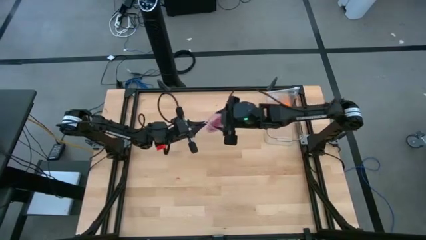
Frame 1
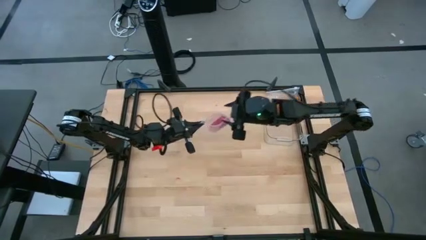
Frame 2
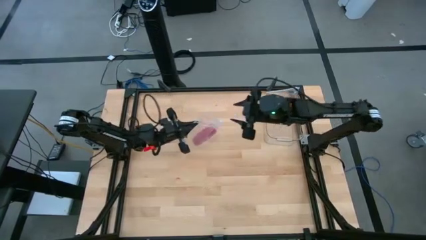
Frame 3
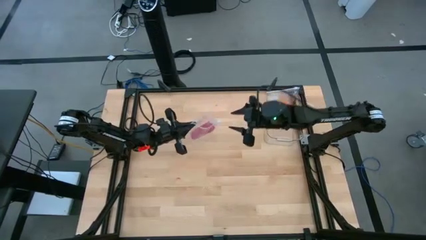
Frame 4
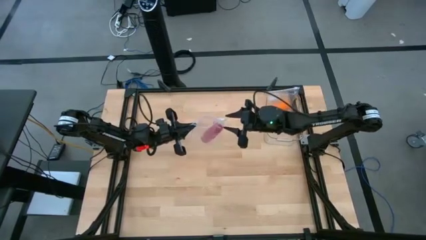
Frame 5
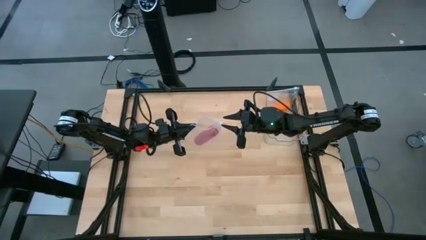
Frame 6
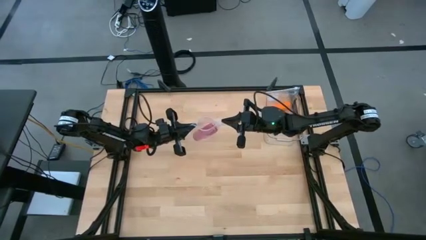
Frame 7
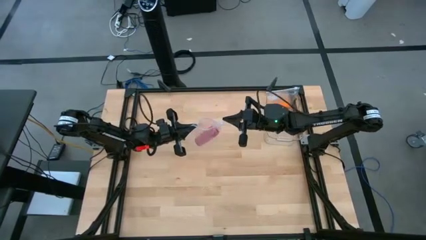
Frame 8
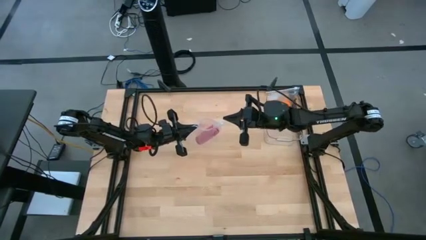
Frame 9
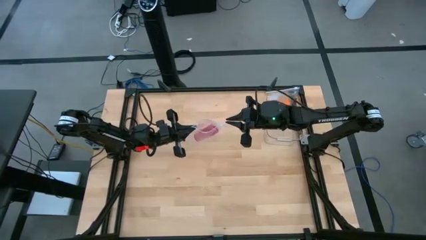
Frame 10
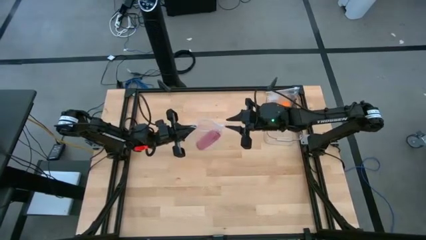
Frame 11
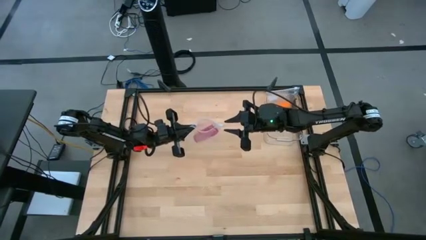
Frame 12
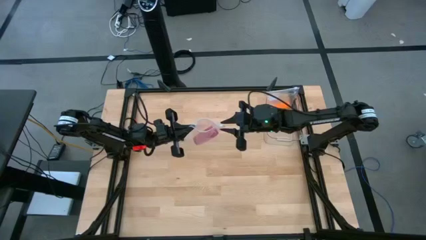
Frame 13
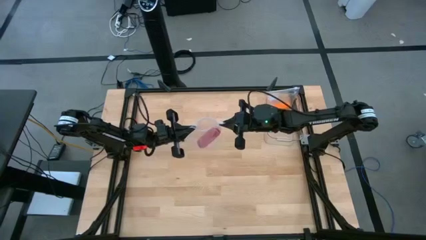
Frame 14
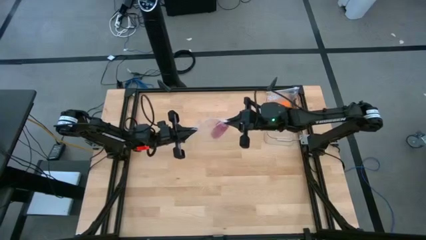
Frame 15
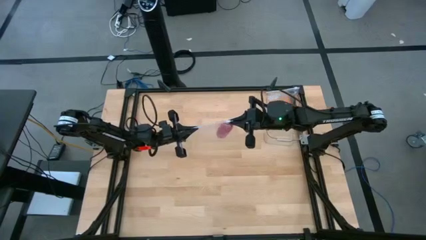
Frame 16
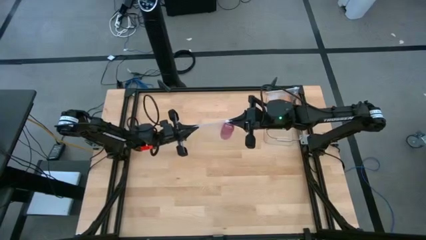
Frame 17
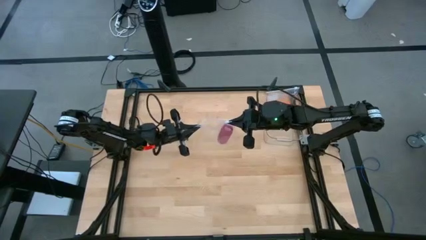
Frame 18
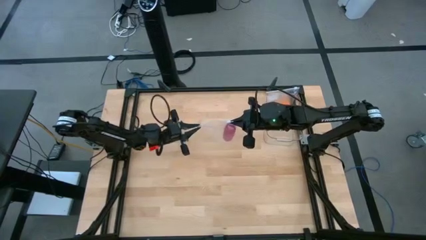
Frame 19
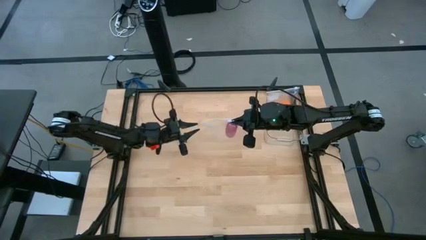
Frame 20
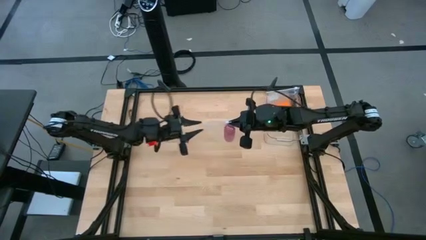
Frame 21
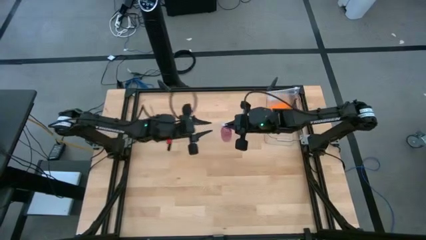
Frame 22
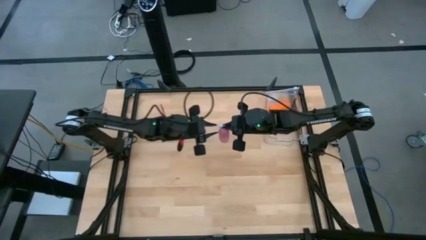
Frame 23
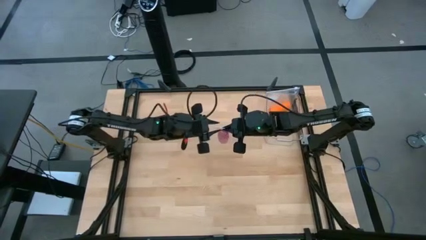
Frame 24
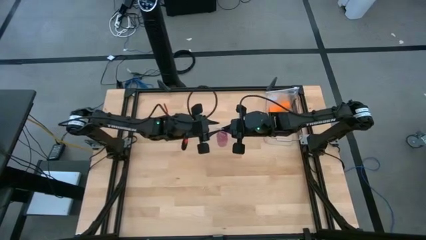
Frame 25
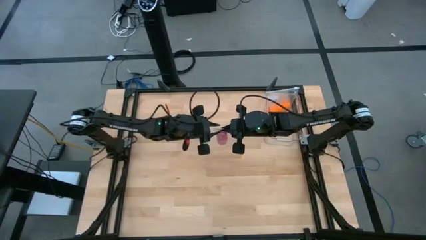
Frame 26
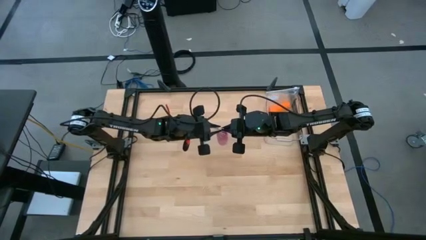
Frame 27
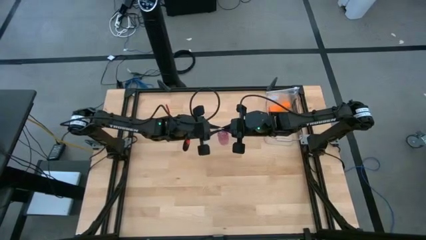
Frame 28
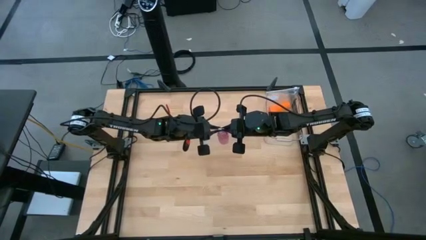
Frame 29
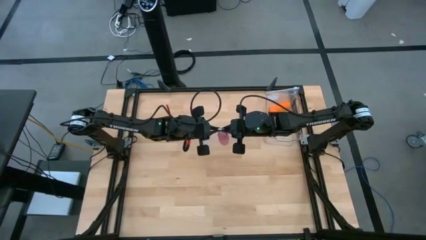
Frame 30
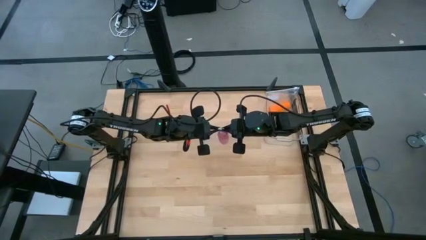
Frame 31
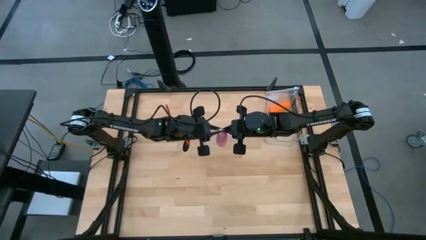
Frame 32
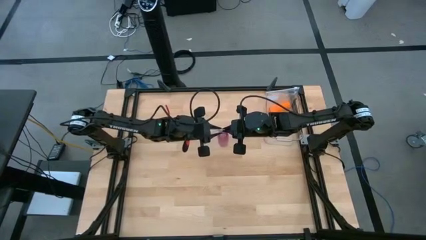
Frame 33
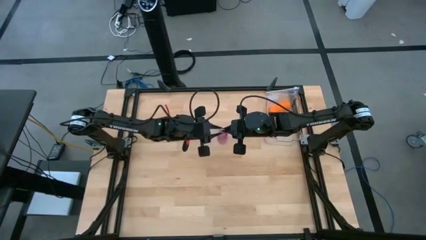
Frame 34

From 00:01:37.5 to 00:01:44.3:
Task: Roll bandage
Close the transparent zip bag

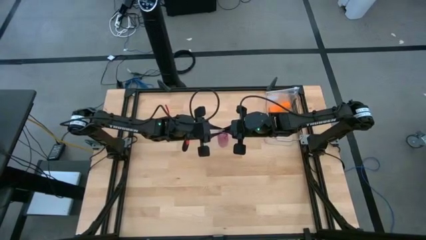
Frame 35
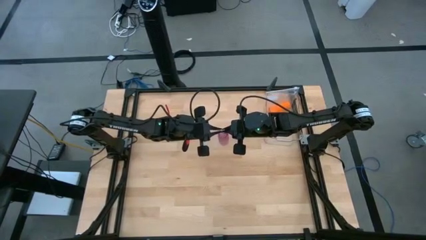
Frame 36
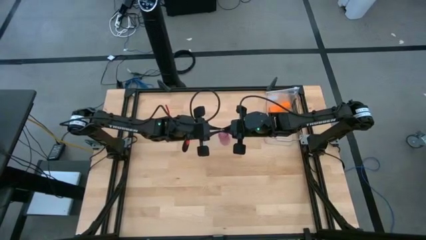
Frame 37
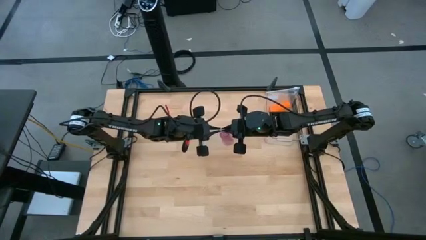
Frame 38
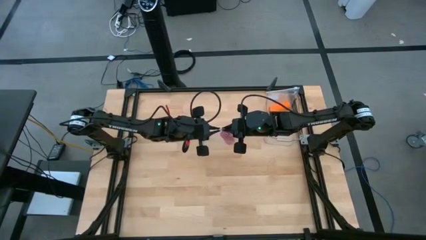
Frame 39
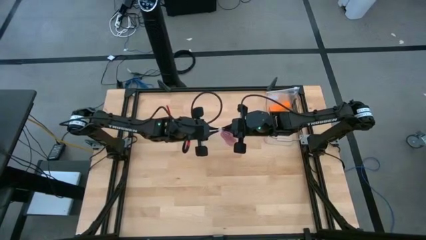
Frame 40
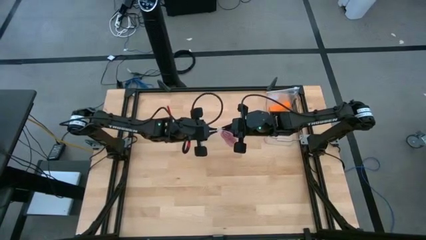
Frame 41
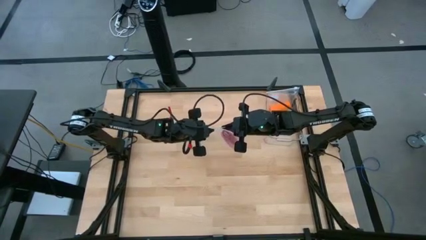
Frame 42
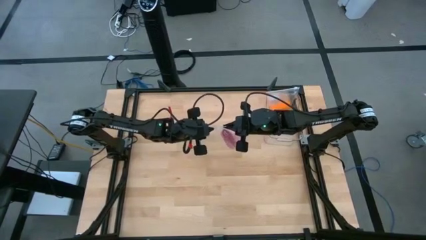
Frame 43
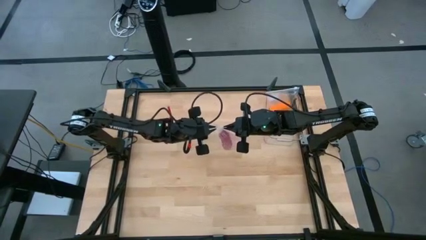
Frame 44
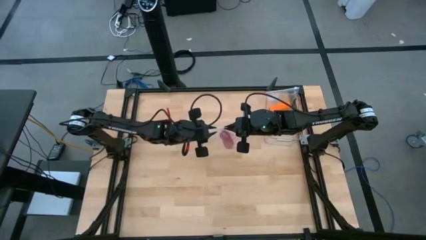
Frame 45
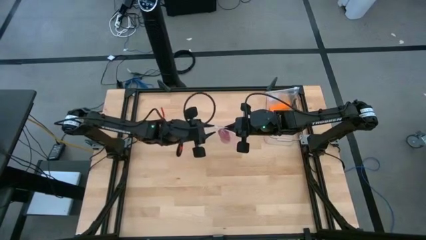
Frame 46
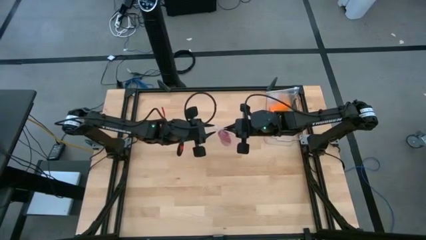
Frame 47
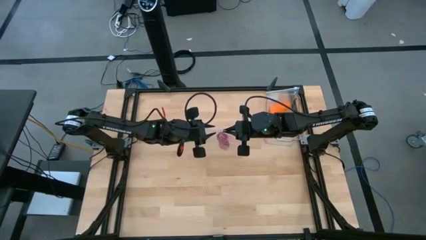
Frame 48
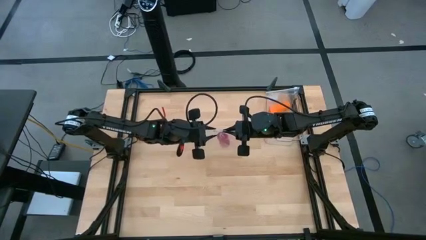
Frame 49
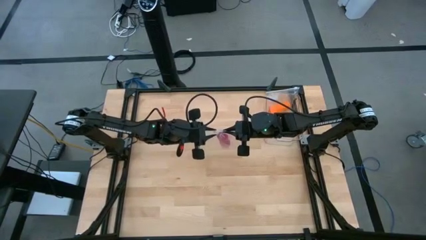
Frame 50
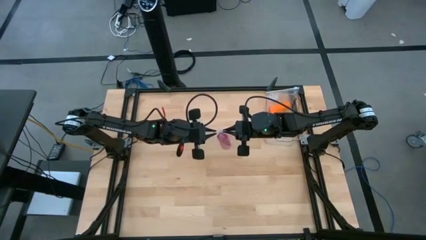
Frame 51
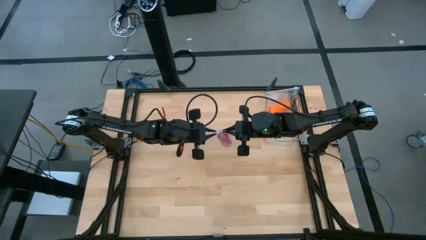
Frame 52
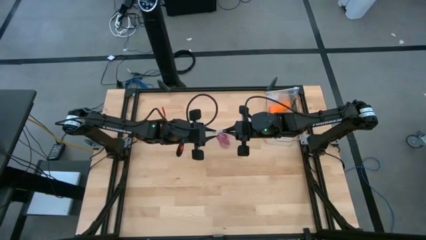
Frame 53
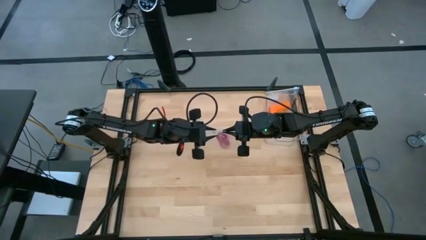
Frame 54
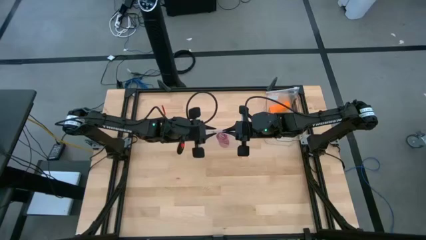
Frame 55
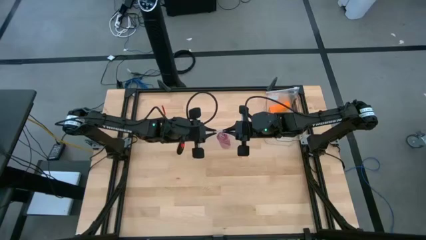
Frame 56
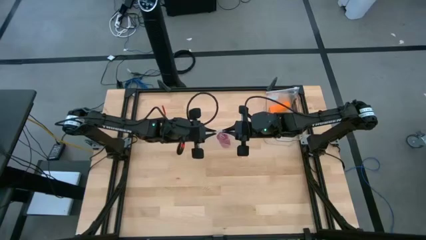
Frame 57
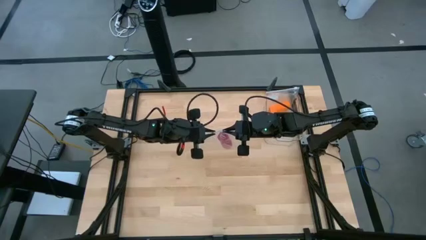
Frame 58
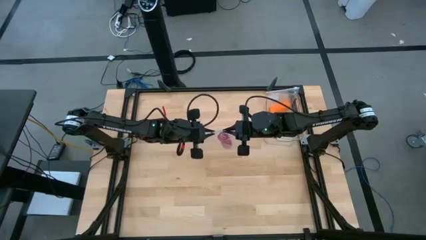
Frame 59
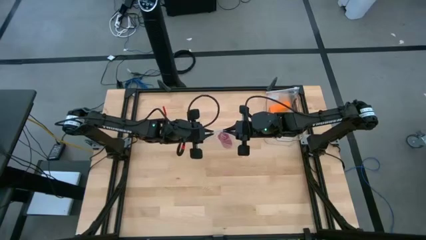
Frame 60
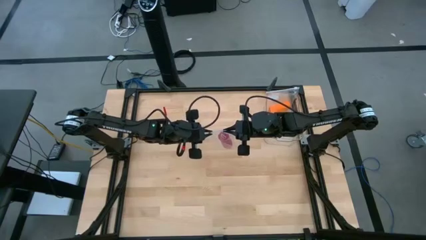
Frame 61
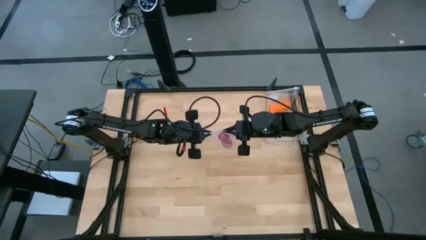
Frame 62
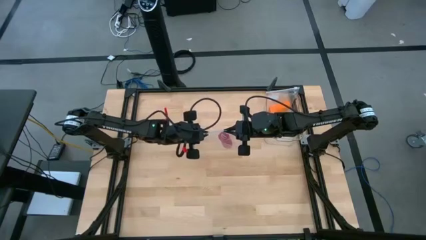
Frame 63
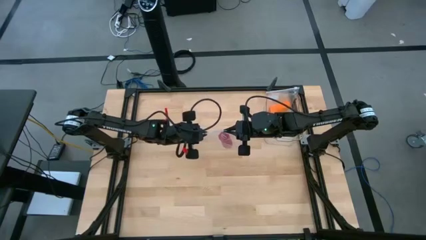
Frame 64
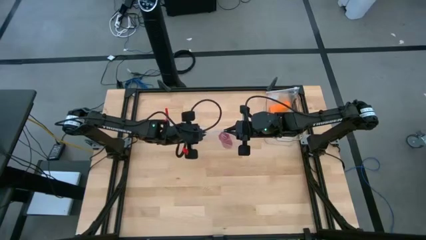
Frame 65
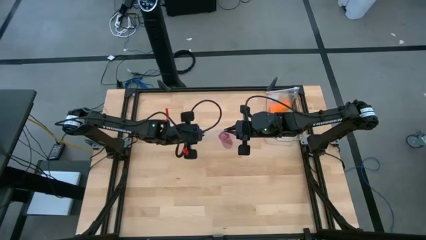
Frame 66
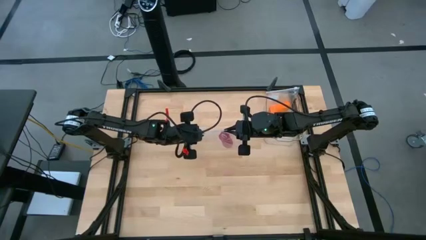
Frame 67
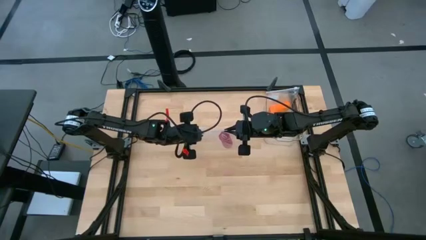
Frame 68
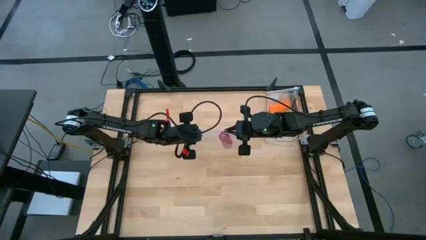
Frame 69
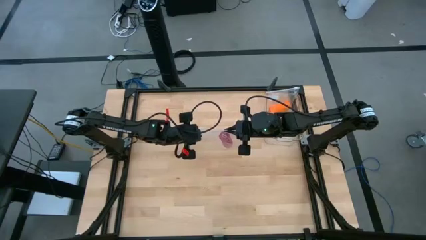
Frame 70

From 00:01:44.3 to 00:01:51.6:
Close the transparent zip bag

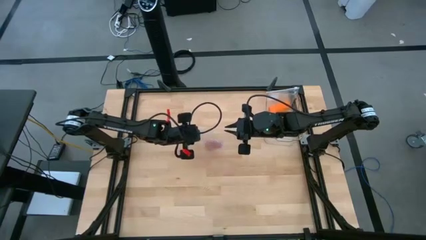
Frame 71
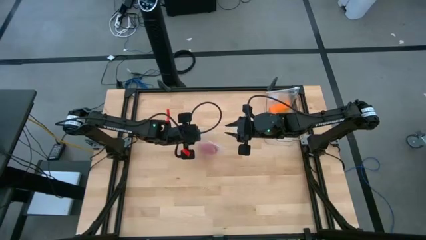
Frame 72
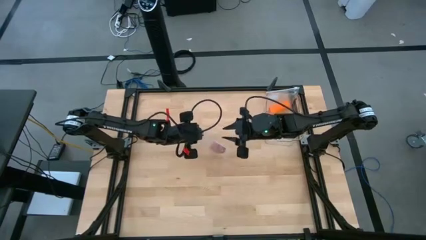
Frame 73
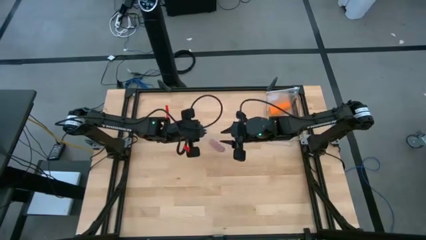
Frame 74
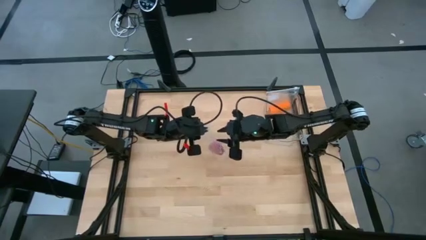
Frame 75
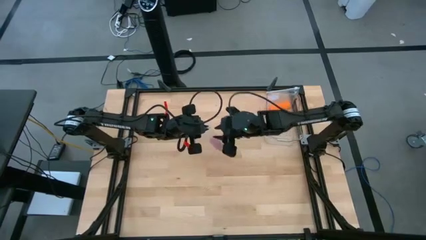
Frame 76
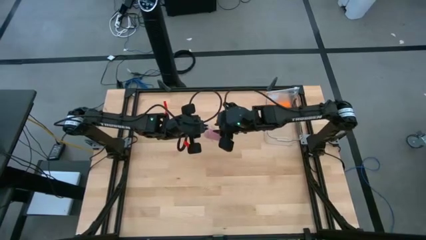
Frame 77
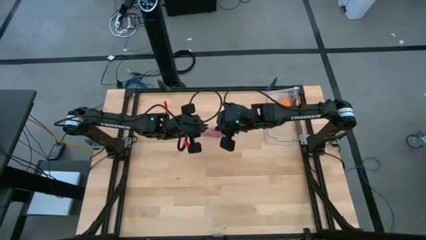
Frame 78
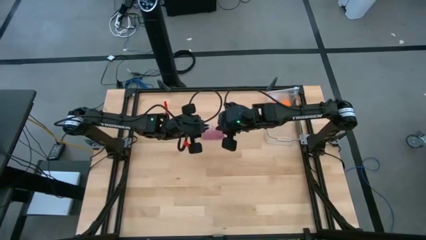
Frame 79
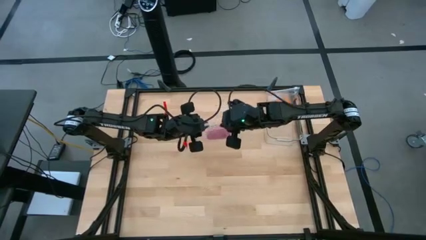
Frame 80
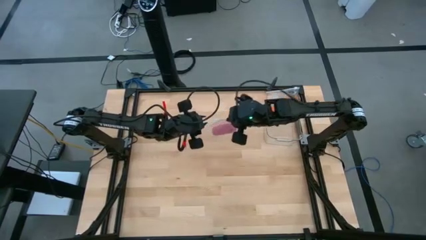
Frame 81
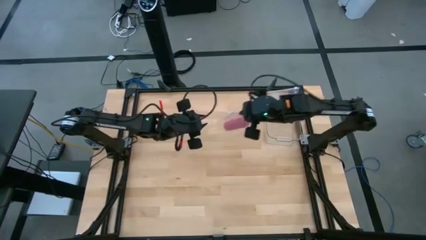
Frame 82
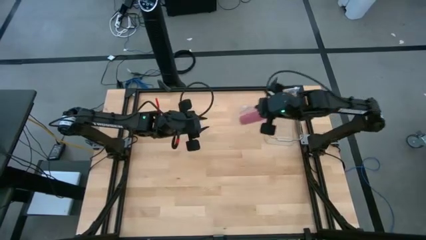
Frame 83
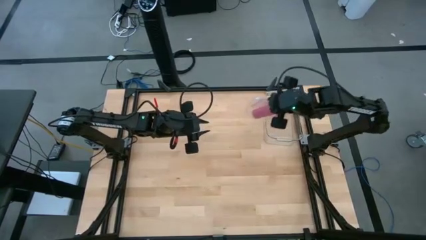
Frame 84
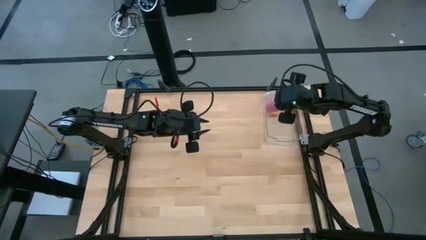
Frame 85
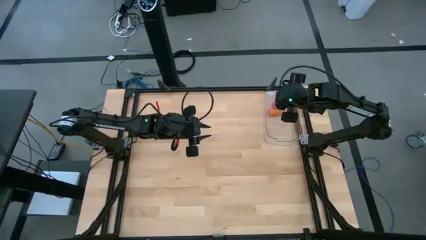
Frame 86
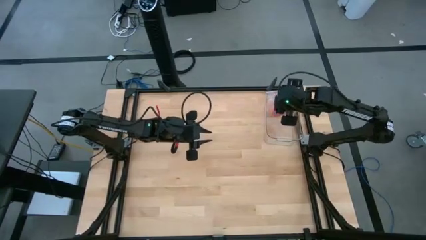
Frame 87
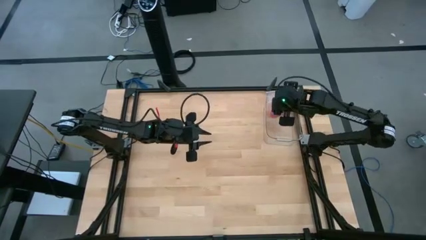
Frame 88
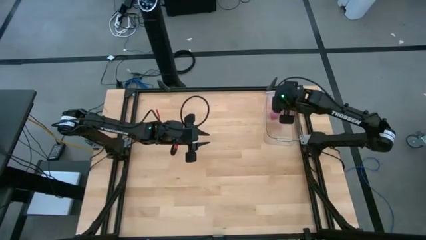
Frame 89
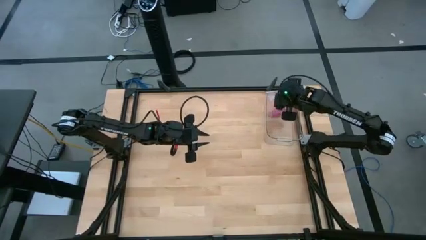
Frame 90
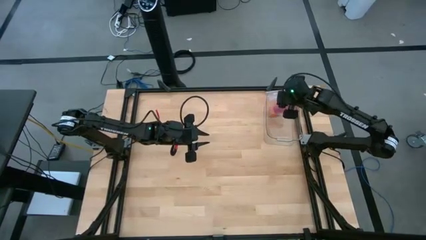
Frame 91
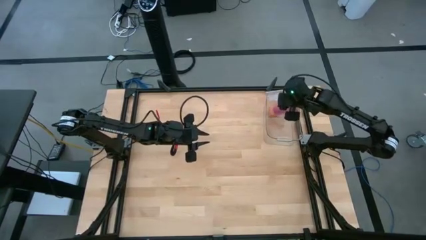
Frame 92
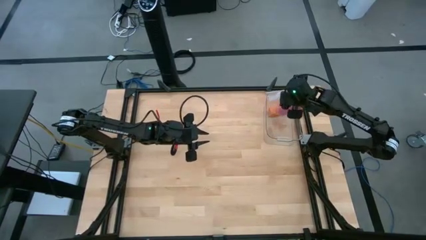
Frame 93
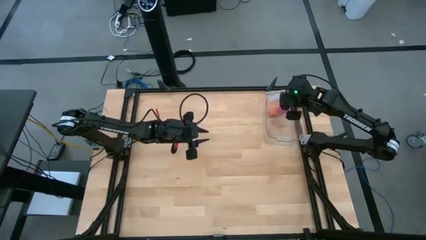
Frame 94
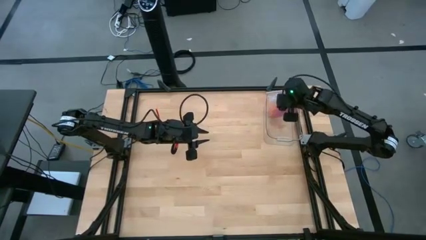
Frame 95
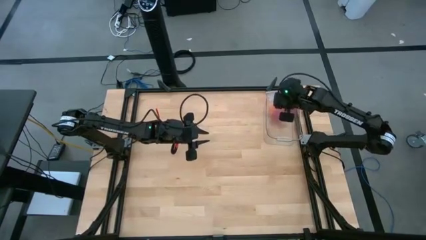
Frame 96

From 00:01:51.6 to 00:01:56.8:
Put the transparent zip bag into the transparent bin
